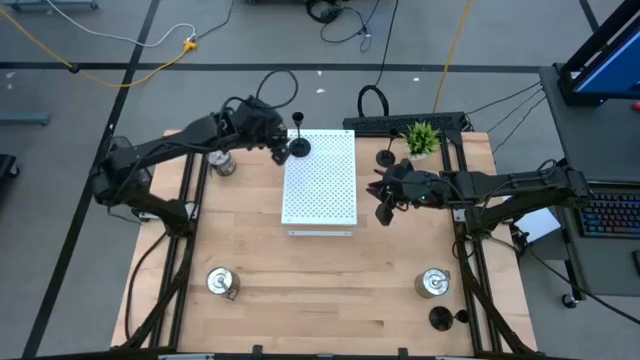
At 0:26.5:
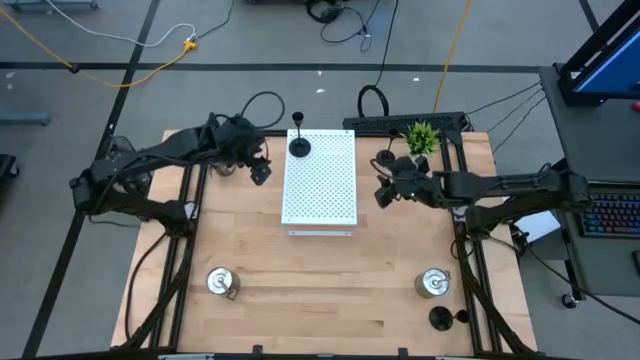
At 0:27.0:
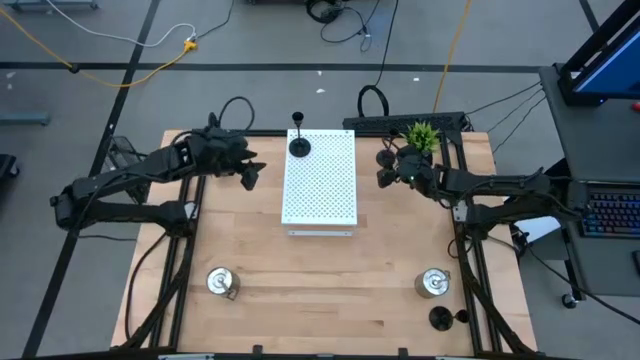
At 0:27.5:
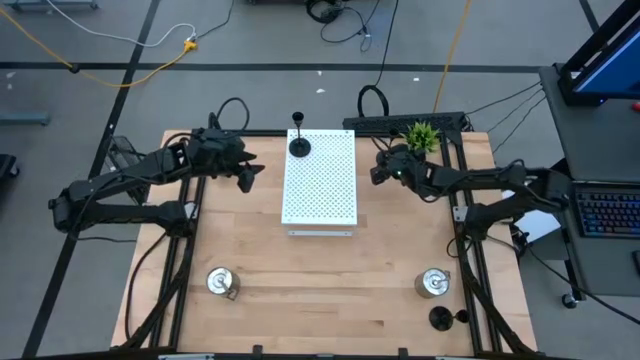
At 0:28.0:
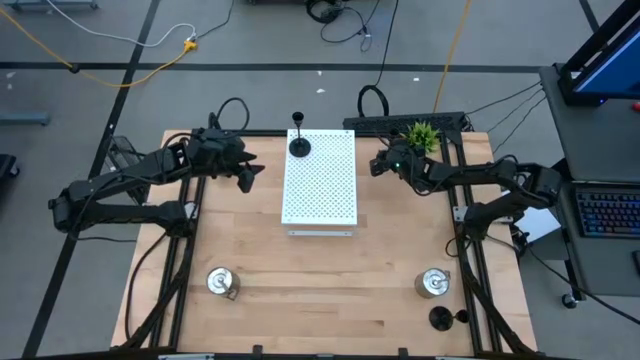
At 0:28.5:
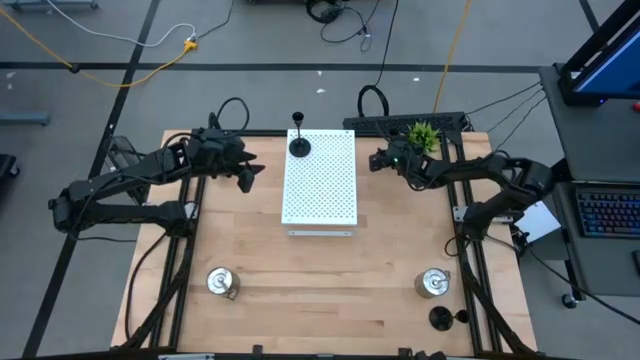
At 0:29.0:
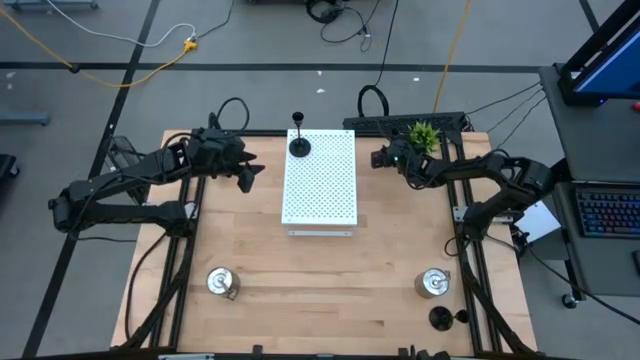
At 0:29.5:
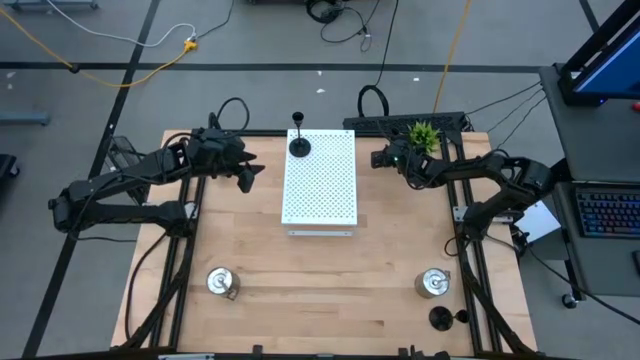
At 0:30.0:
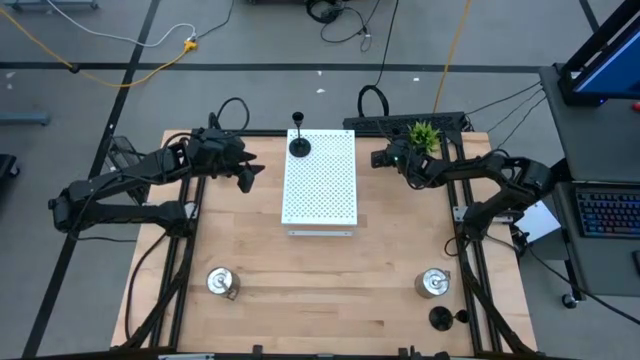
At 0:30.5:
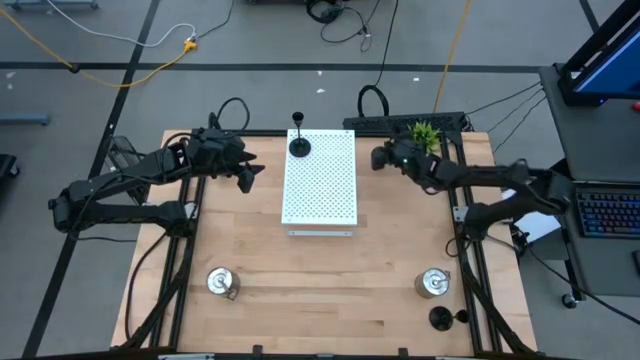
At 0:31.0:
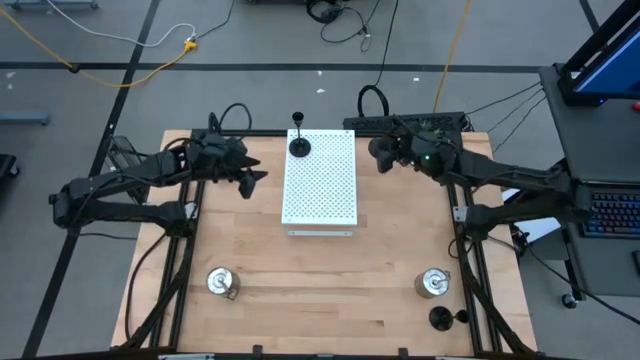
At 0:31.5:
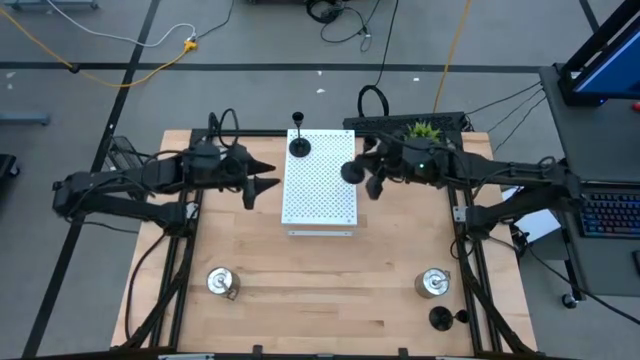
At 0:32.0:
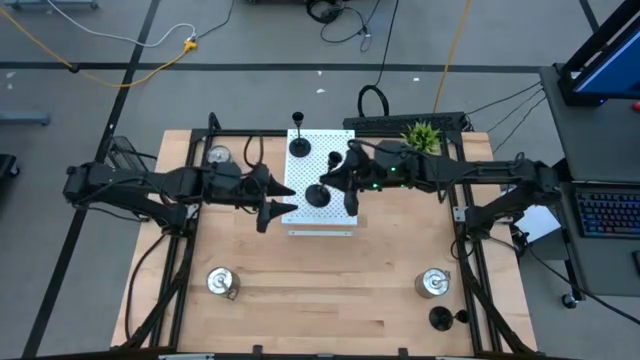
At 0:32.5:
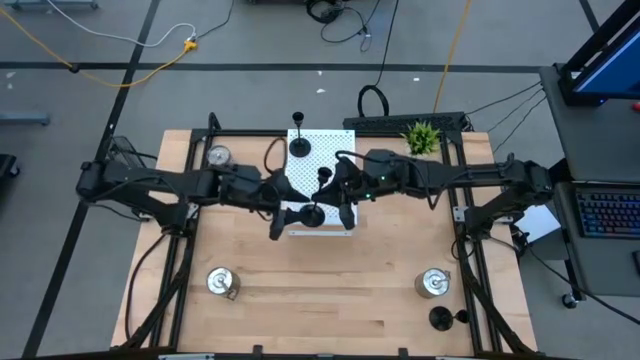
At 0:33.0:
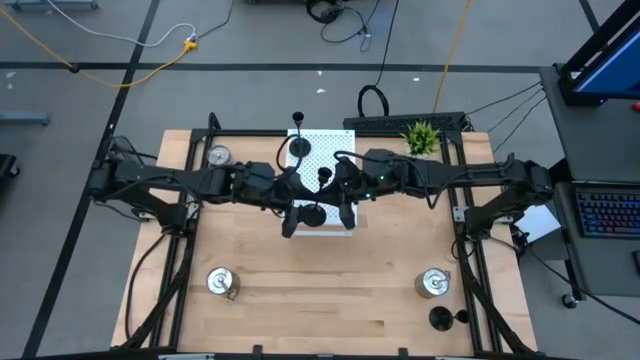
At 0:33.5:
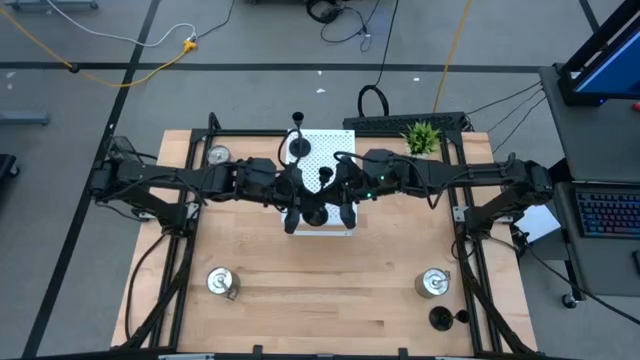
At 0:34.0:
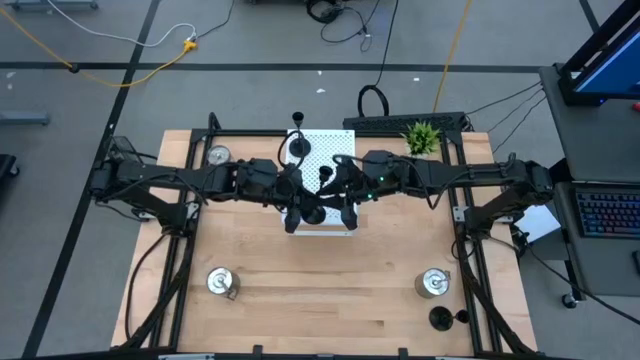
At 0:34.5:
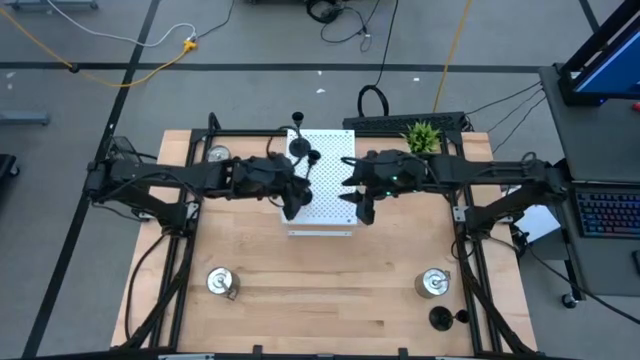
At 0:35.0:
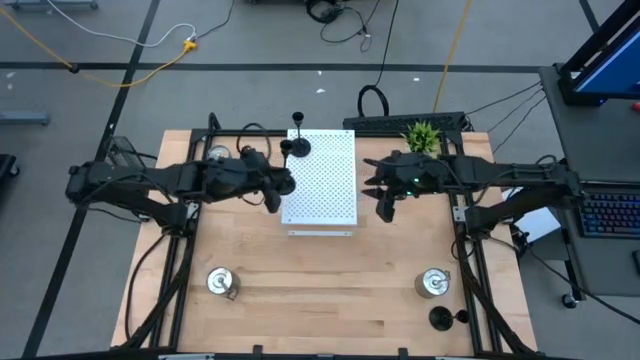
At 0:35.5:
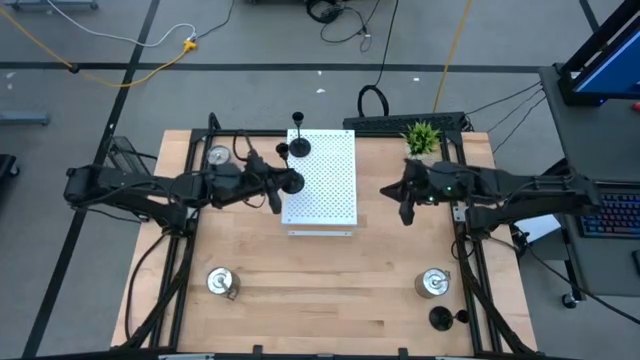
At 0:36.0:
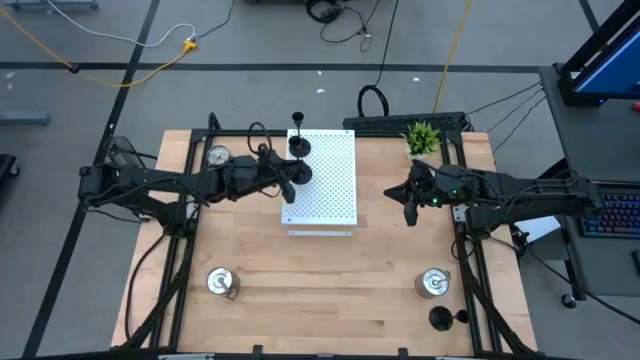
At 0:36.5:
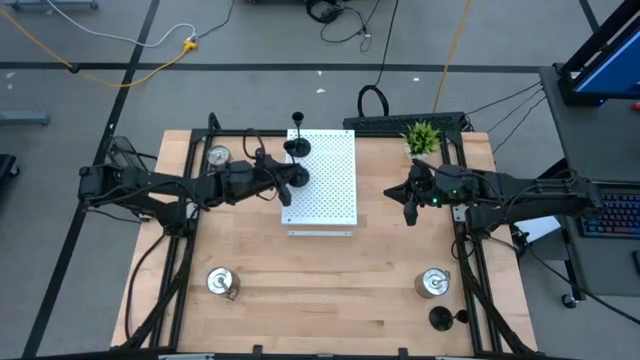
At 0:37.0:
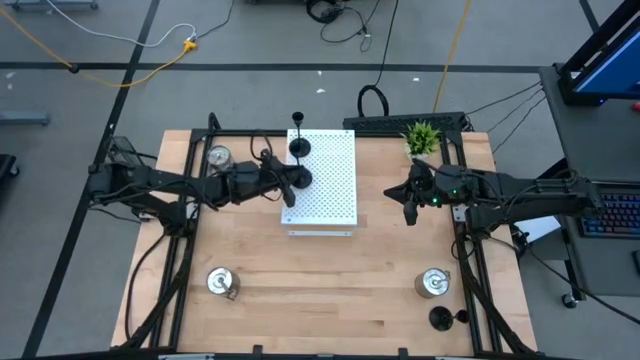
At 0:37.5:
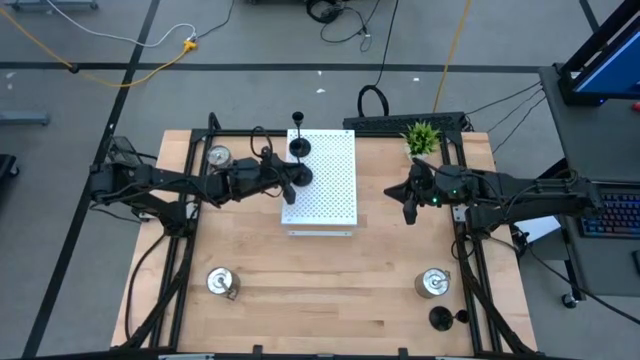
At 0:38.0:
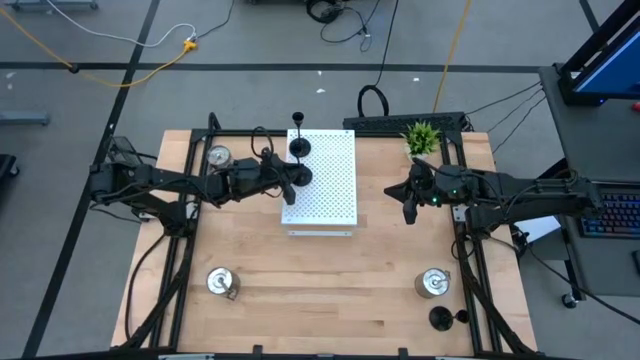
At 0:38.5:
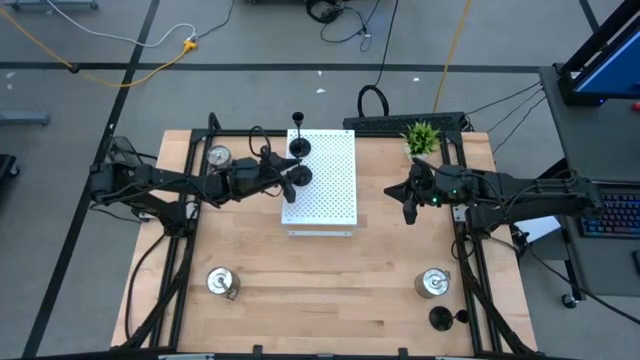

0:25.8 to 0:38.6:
Task: Pick & Place candle stick holders
Put the top black candle holder on the shelf aligned with the other black candle holder

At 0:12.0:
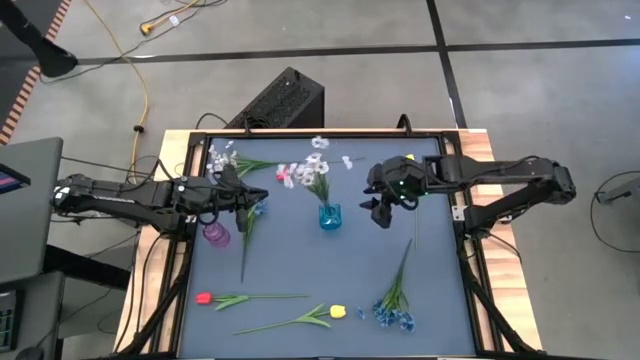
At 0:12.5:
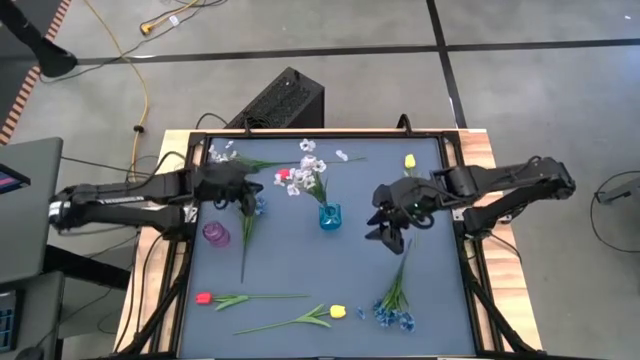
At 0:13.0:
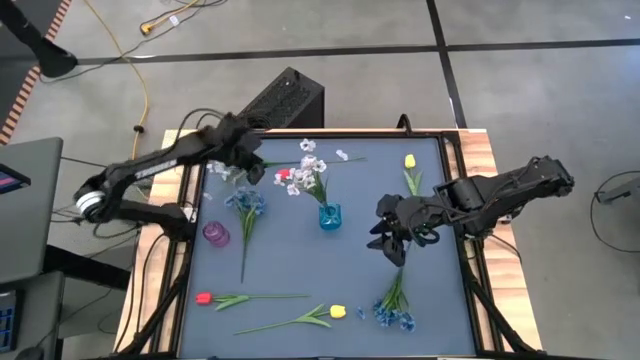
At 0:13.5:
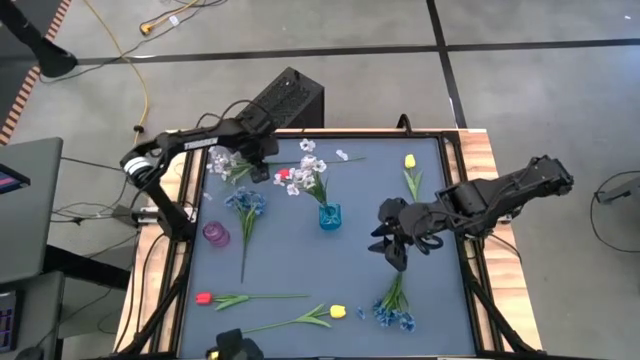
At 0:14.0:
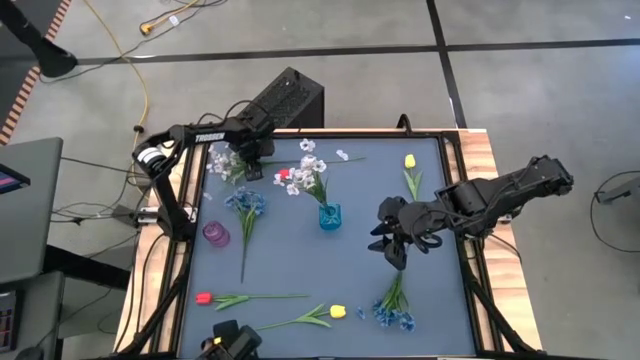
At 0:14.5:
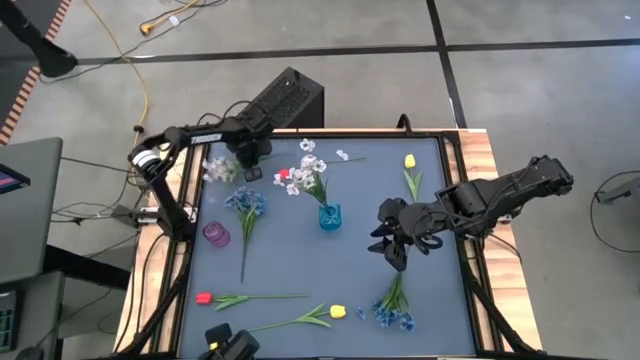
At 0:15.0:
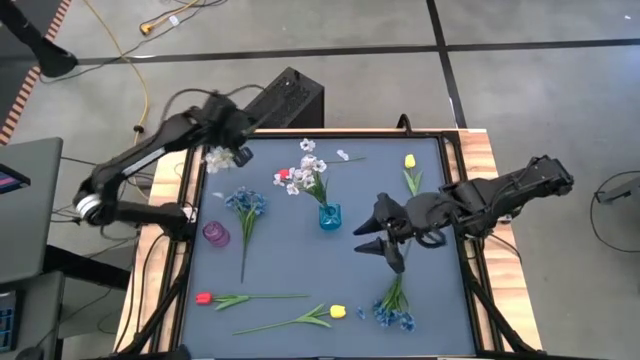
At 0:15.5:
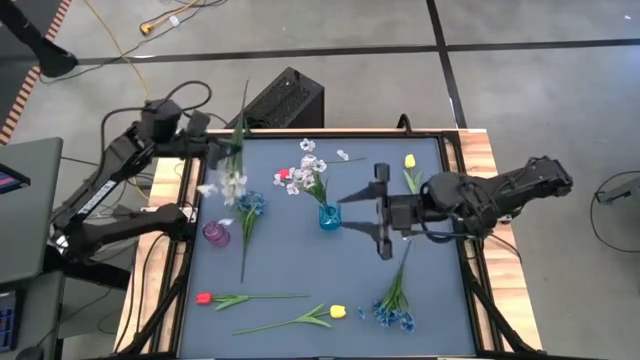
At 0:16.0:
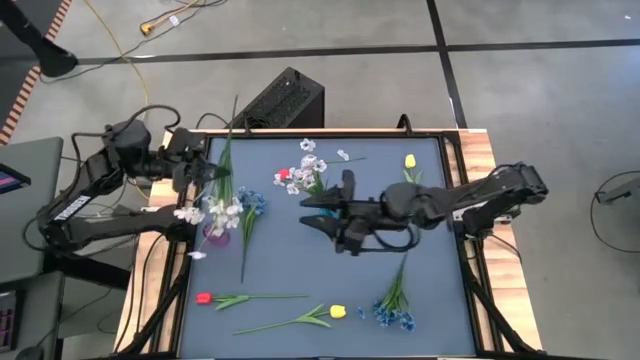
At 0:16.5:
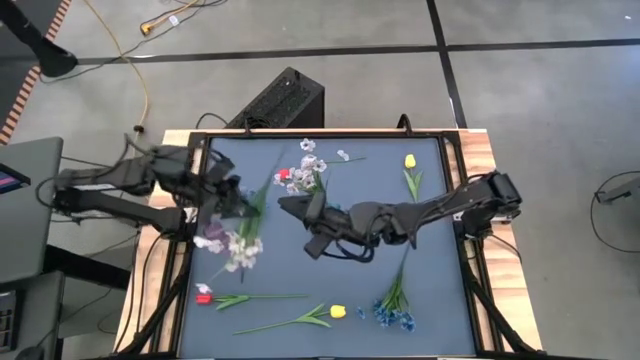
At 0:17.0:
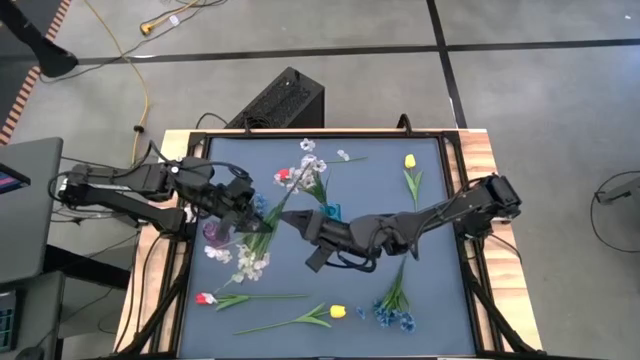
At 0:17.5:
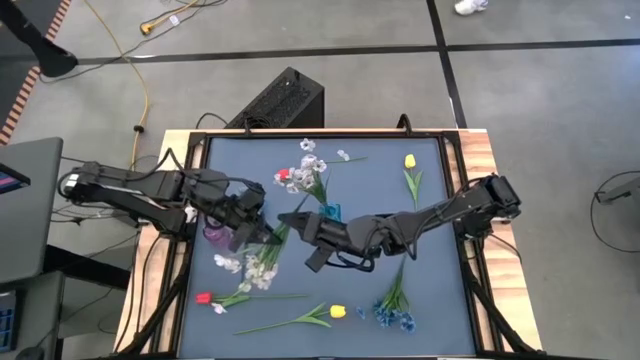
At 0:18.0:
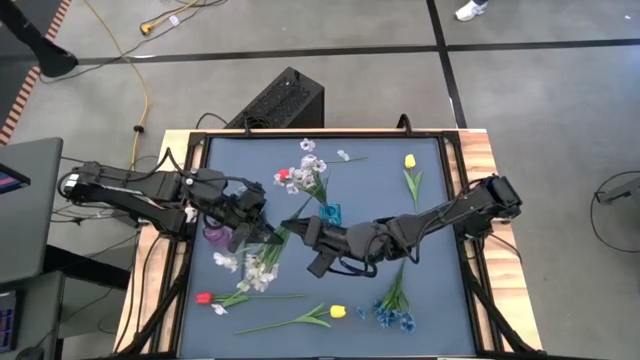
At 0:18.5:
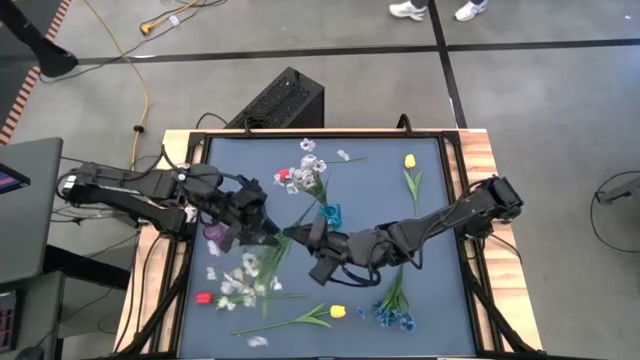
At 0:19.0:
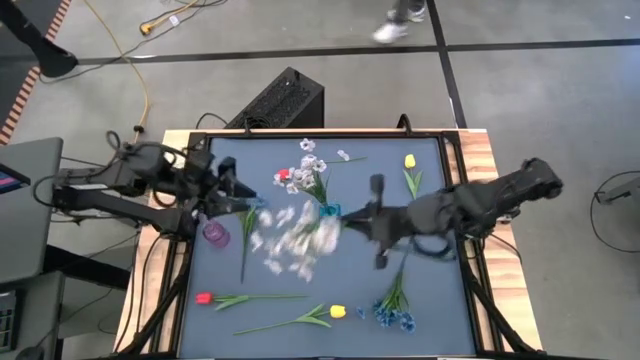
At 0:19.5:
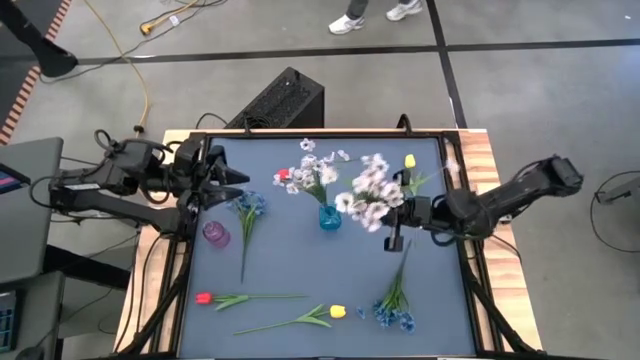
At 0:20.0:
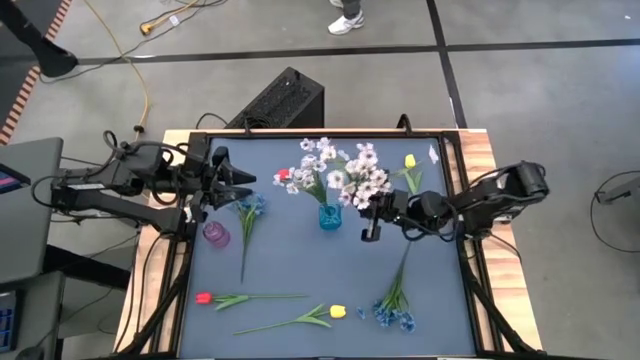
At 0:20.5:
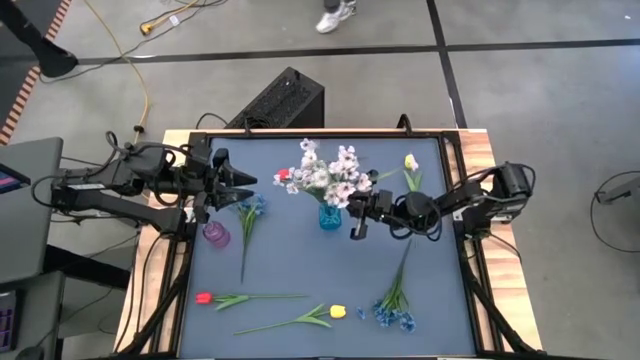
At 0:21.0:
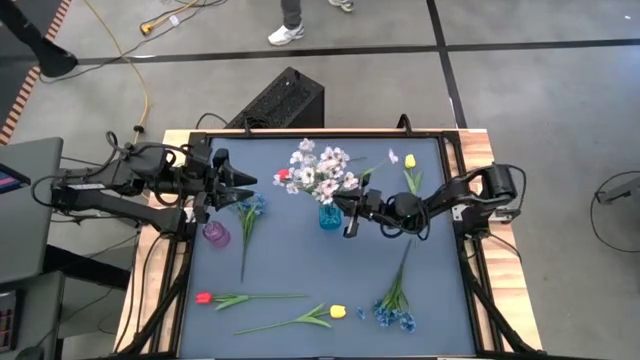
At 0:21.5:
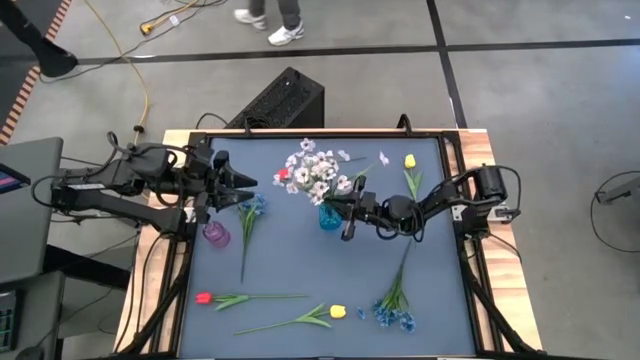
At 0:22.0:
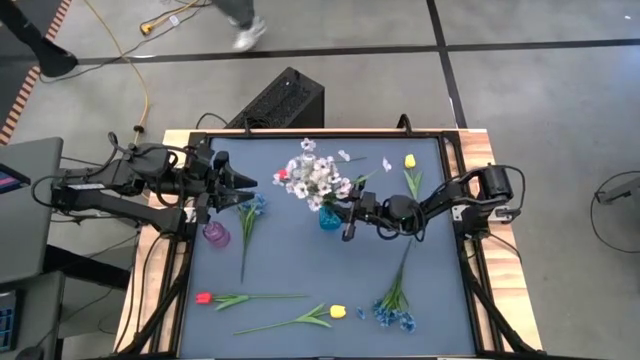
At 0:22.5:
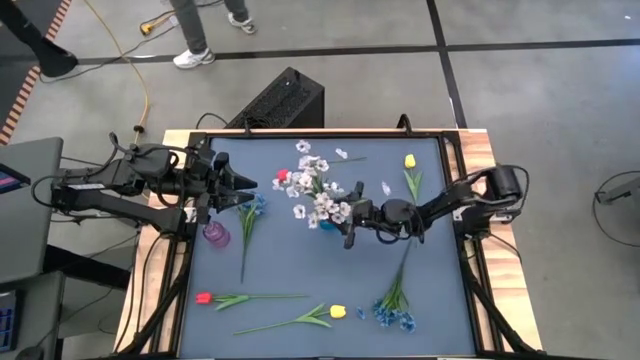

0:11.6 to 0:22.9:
Task: Sort flowers into vase by color
Put the white flowers into the blue vase
